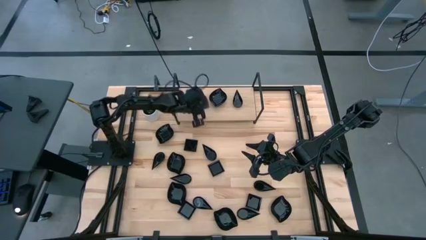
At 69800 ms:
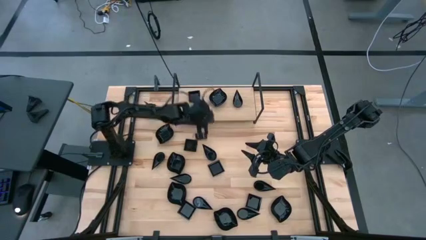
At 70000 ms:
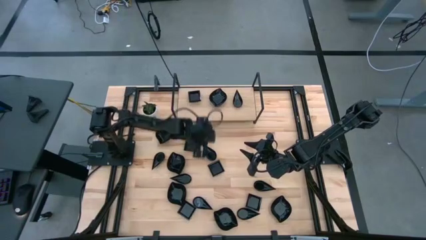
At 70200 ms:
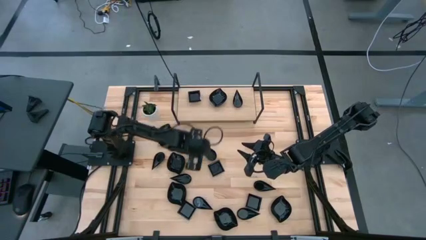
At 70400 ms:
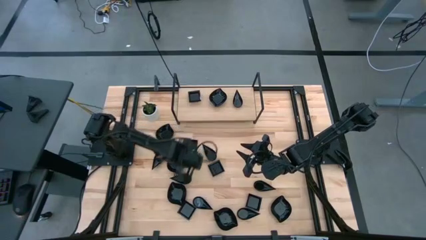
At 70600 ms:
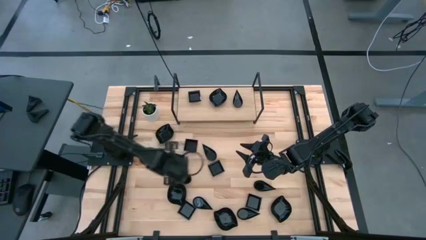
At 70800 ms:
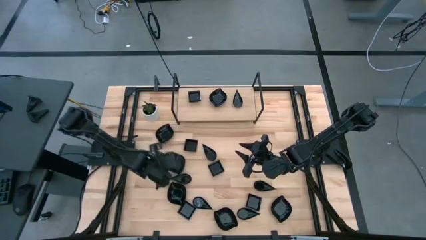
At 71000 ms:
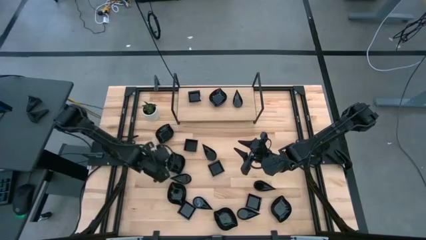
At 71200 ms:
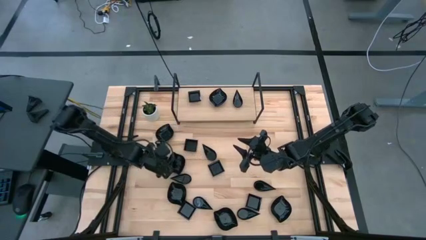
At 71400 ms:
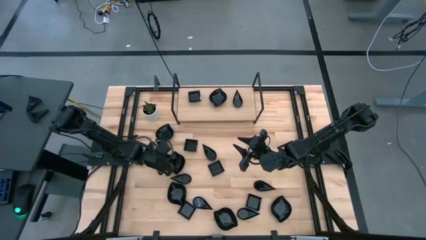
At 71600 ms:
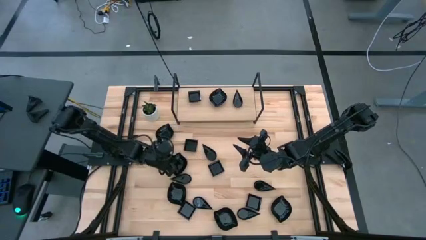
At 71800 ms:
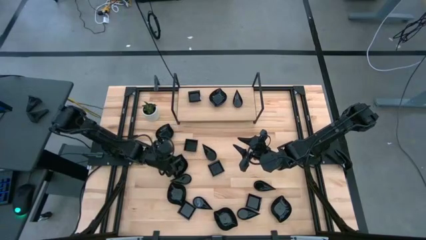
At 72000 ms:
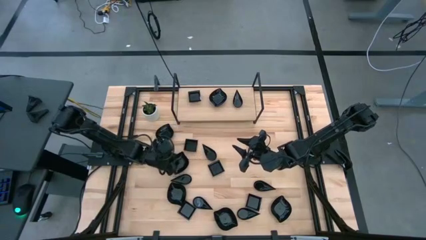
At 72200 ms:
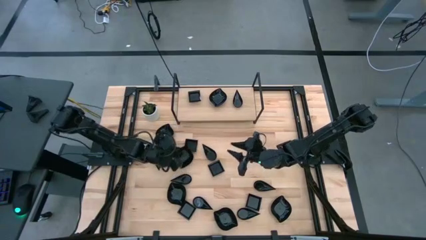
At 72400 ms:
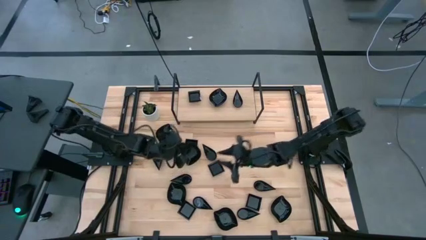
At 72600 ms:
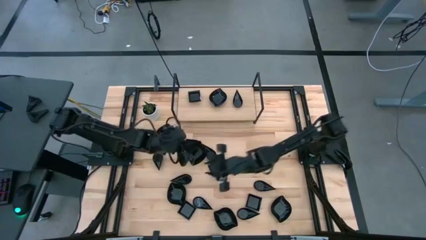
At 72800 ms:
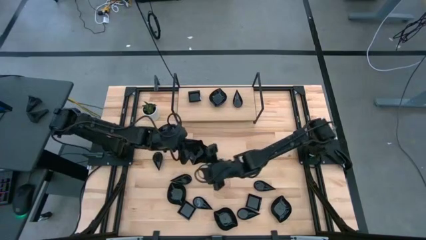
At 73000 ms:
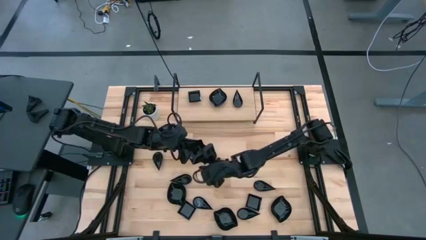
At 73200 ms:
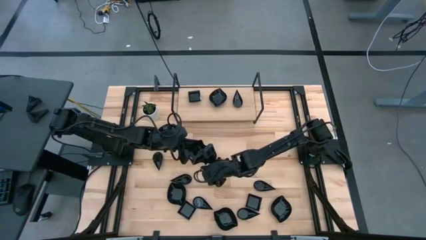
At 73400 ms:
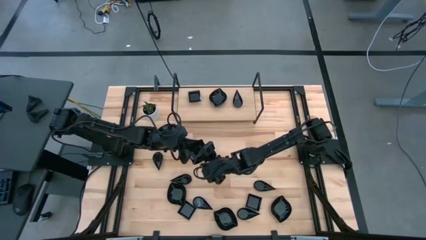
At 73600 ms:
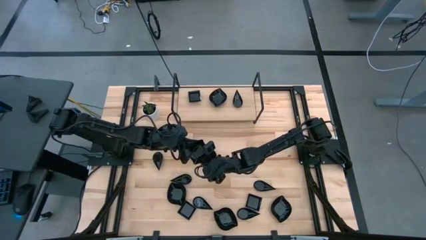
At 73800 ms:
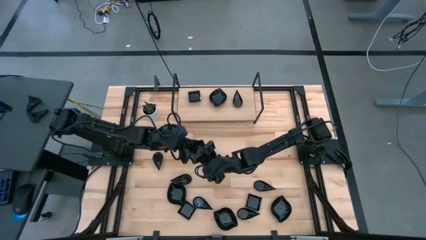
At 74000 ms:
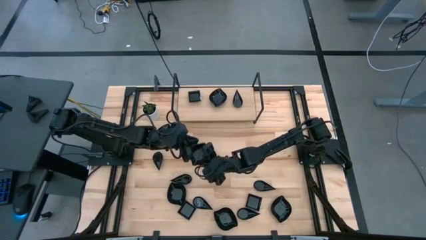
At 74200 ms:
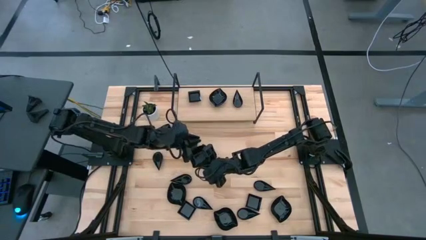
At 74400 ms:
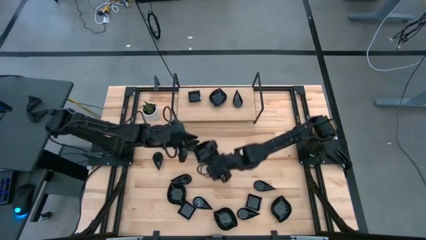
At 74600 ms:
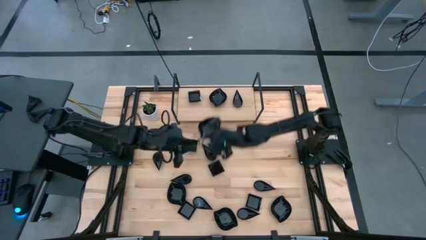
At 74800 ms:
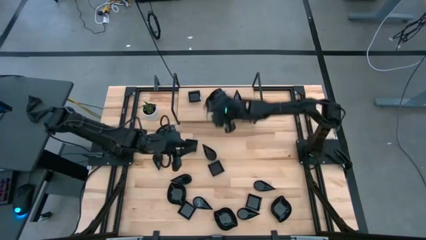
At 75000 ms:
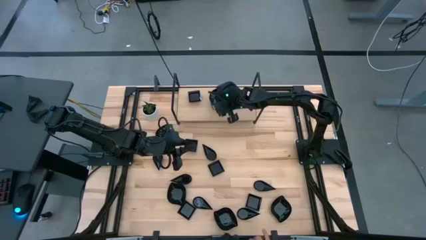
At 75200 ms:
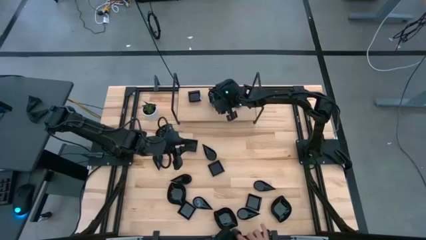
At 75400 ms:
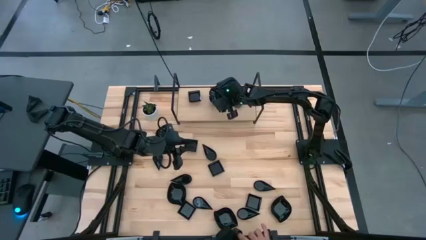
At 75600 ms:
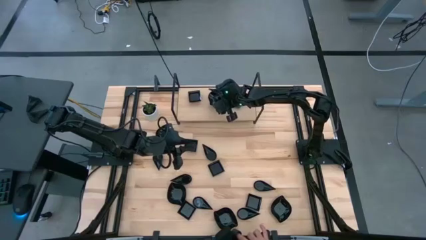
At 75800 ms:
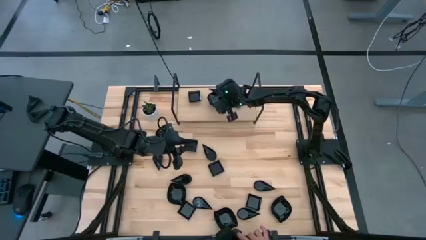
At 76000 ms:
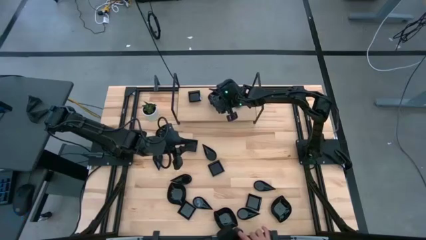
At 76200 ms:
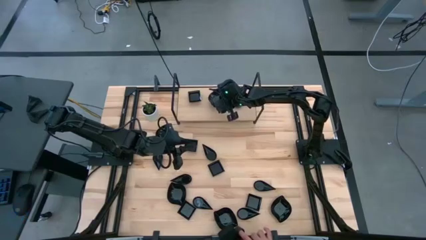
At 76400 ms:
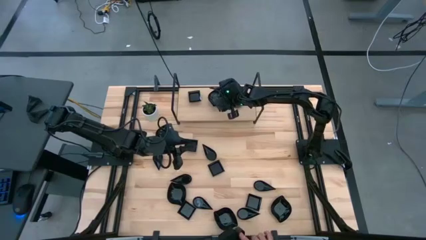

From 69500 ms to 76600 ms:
Task: Pick & Place Mini shaped plates
Stack the black leaf shaped bowl on top of the other black leaf shaped bowl on the shelf

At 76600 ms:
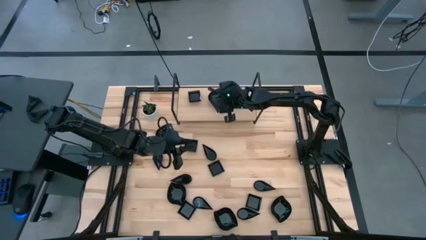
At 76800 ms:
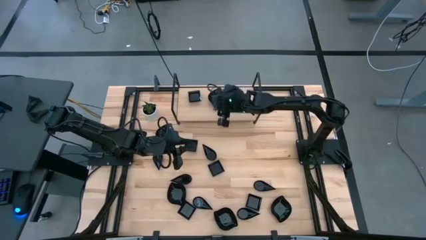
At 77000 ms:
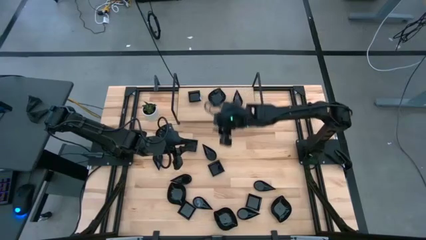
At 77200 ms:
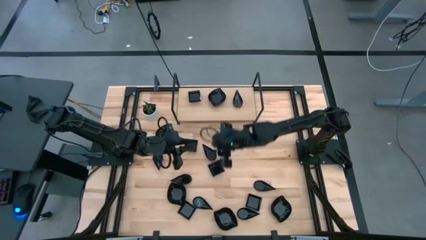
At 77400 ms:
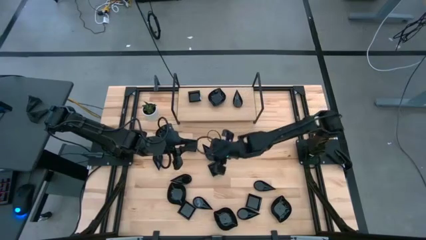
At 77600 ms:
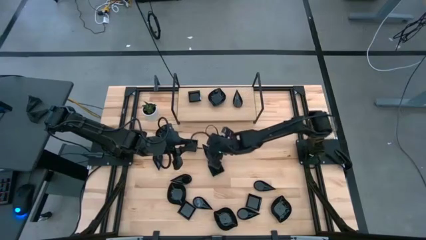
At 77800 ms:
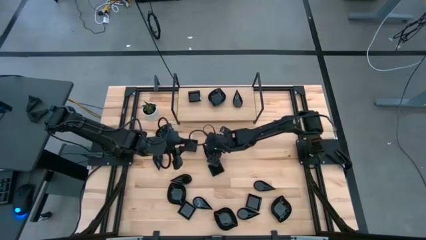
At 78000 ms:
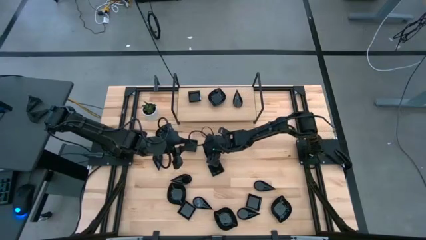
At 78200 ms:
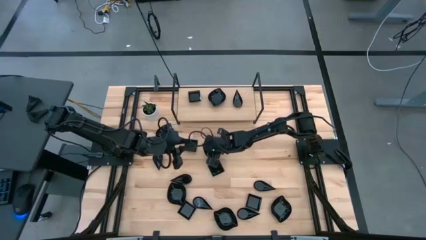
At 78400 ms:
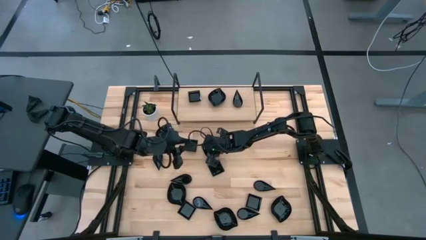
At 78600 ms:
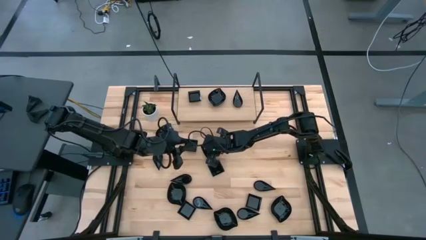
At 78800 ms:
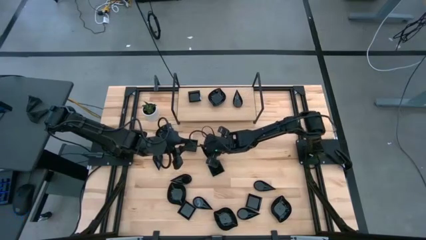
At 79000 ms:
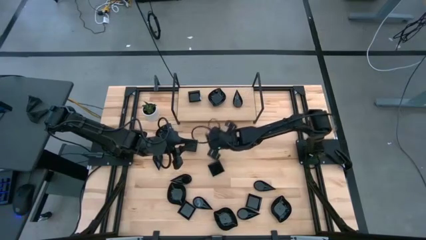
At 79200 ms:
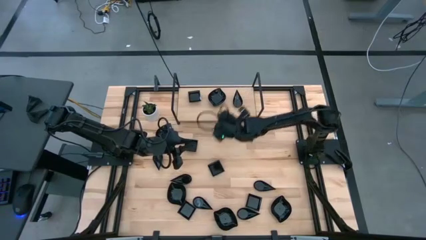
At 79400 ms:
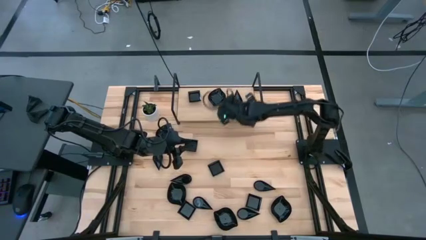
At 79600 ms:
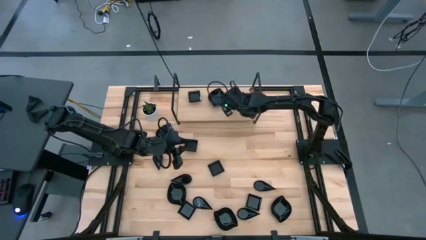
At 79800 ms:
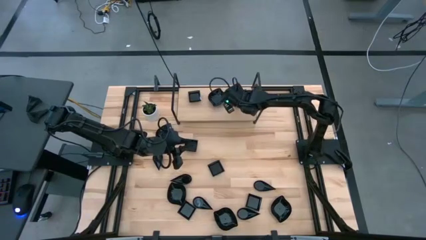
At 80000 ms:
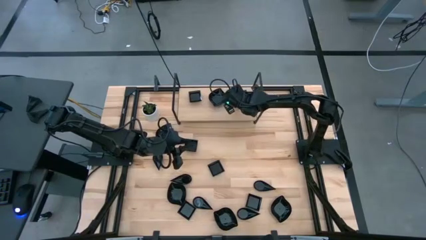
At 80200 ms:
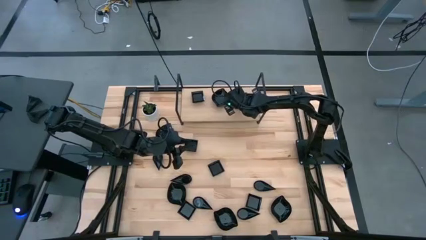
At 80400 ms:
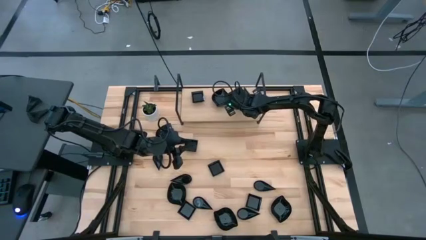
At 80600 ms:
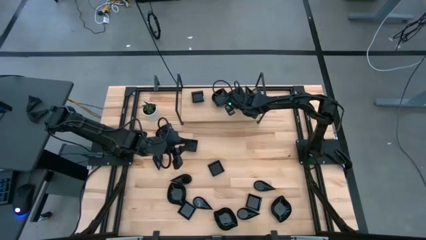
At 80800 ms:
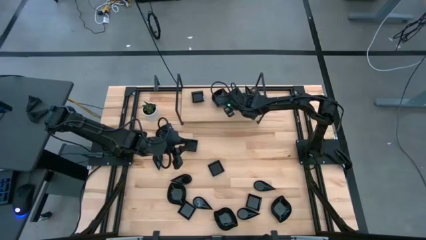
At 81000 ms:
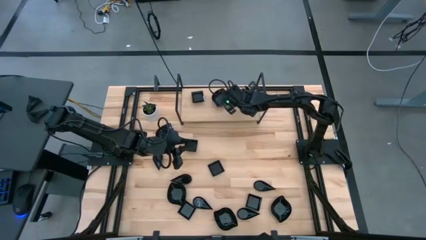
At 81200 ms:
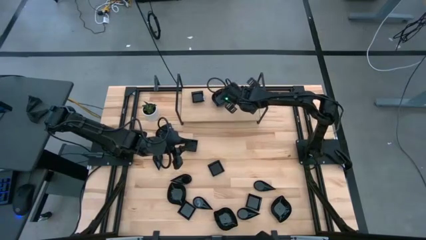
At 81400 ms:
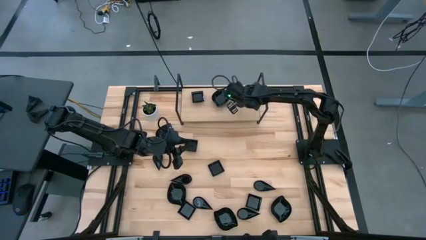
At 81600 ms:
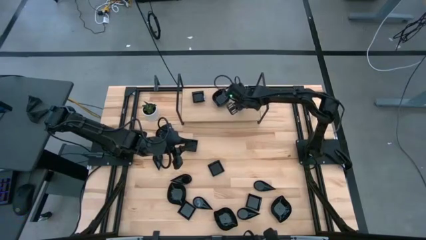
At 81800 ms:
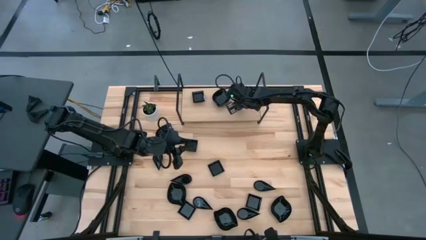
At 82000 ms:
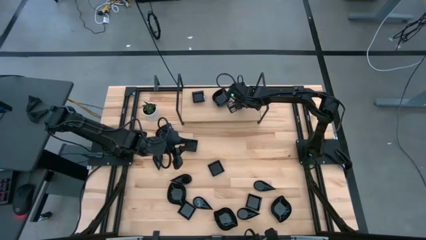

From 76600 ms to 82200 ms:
Stack the black teardrop shaped bowl on top of the other black teardrop shaped bowl on the shelf

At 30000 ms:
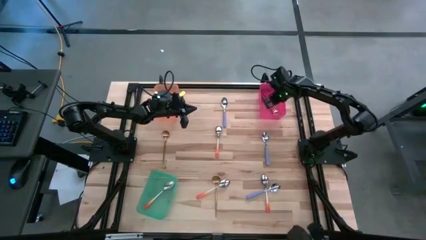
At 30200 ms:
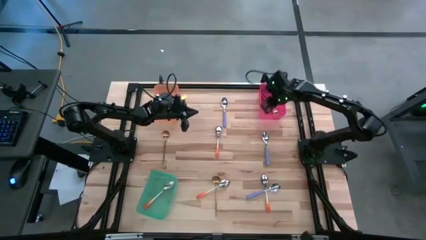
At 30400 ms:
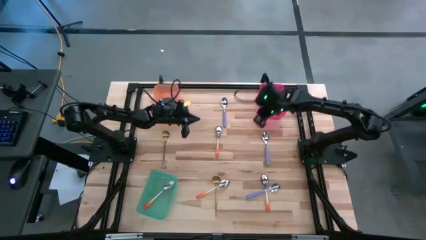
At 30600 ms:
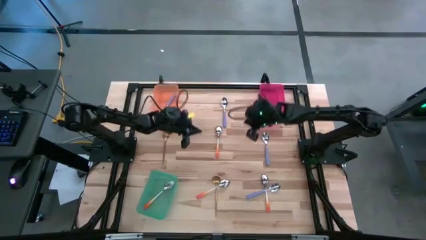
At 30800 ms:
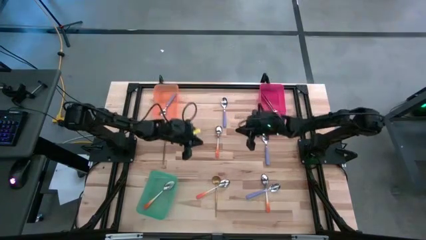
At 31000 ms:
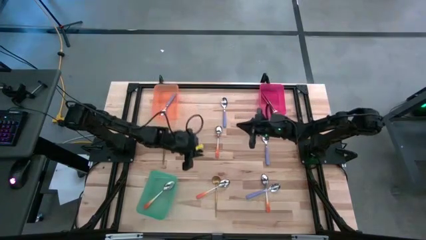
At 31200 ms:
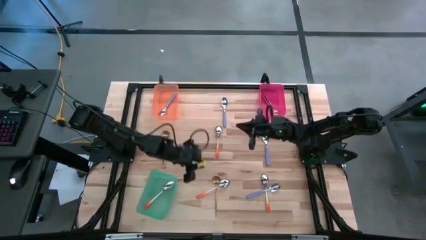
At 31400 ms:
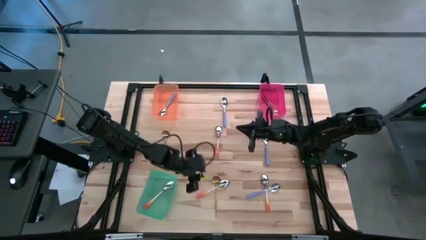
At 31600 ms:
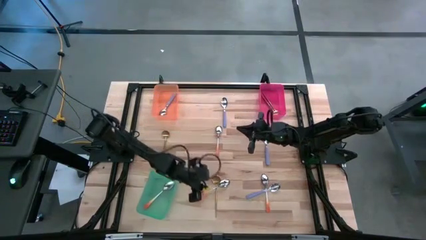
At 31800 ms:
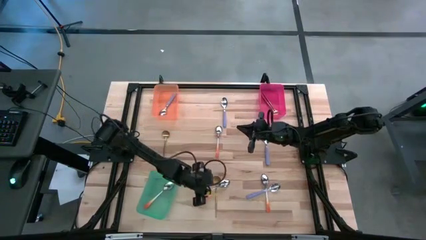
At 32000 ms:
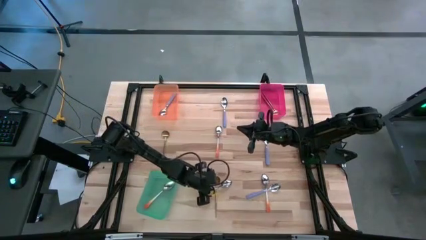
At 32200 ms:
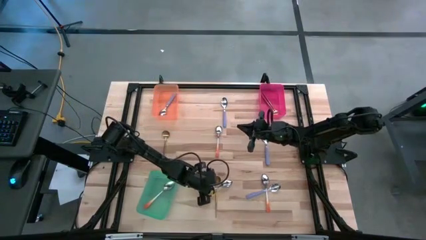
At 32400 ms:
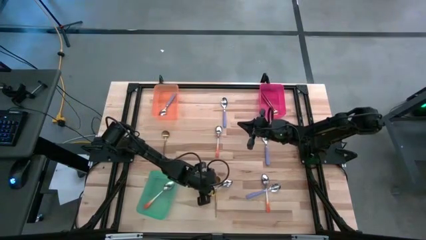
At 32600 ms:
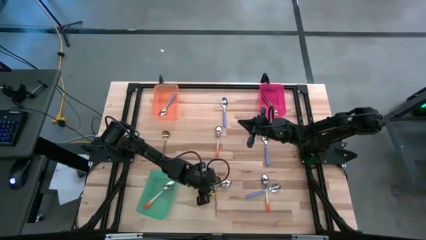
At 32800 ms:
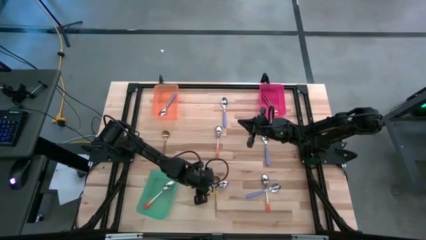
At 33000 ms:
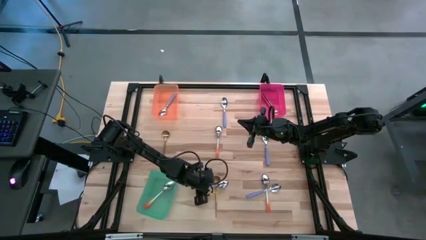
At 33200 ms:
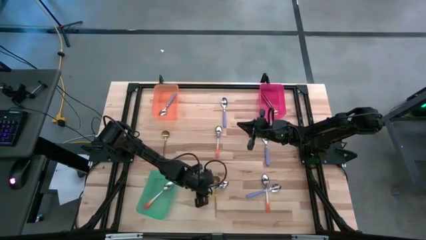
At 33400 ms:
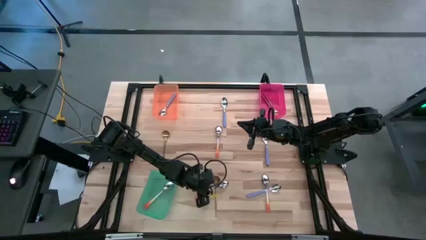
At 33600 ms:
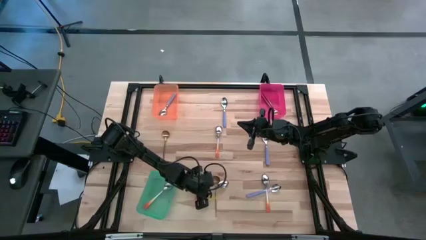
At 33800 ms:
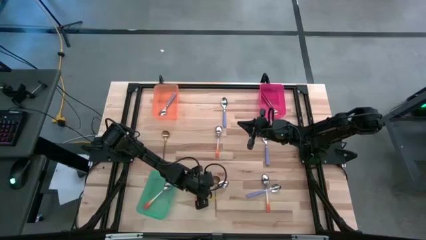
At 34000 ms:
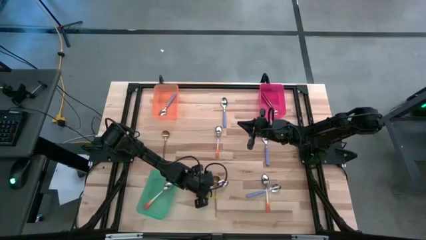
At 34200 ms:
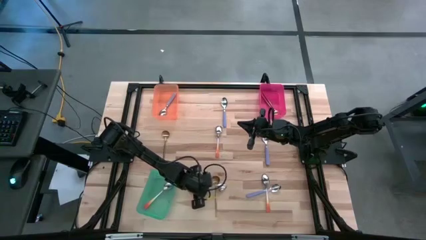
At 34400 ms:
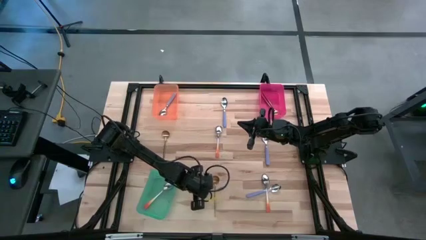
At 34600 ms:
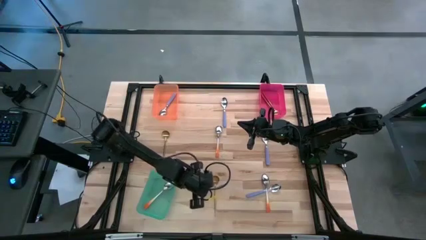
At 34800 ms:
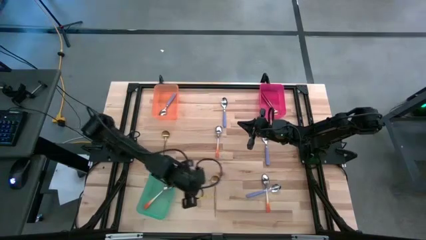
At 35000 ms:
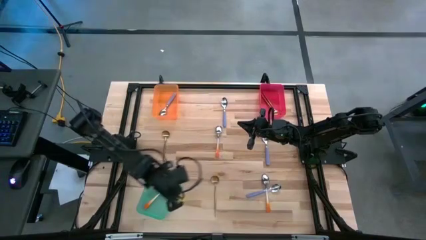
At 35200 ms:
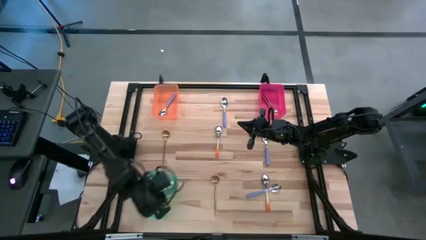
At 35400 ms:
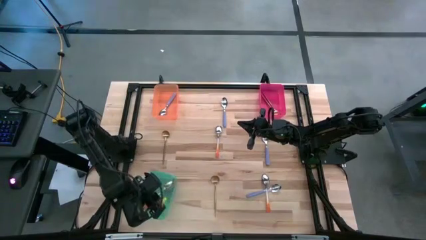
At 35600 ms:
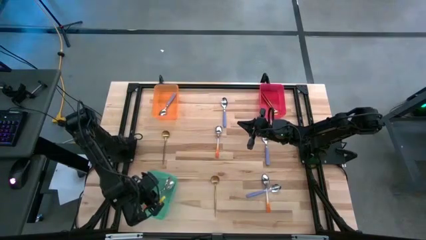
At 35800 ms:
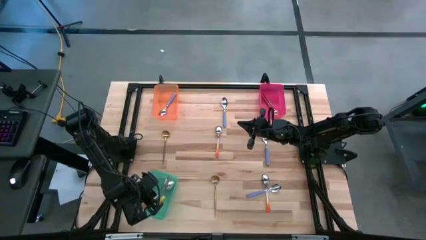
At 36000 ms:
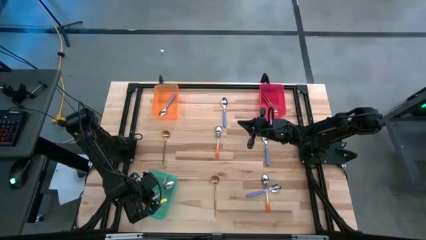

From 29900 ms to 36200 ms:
Task: Sort silverware by color (type)
Put the orange spoon into the green bin
